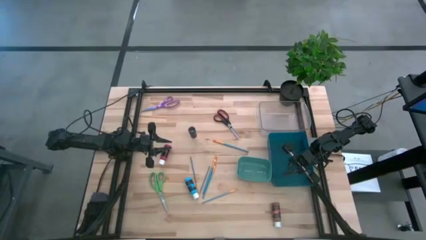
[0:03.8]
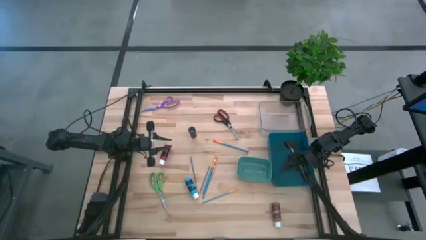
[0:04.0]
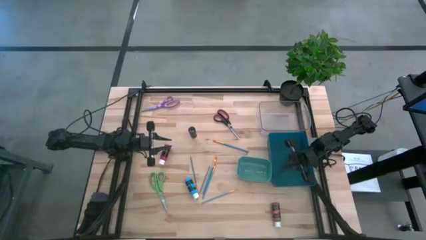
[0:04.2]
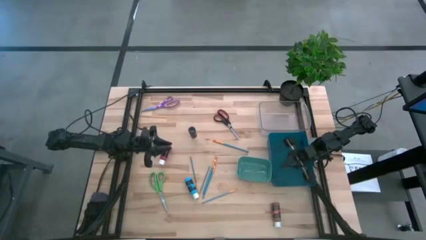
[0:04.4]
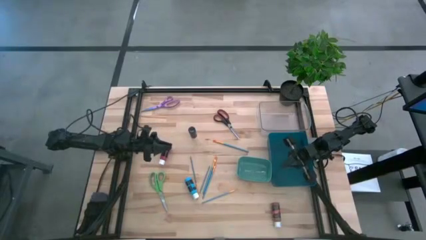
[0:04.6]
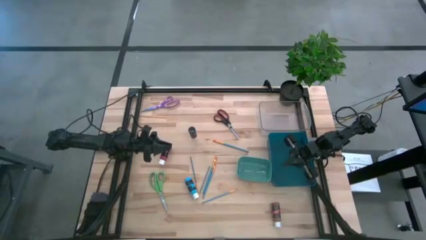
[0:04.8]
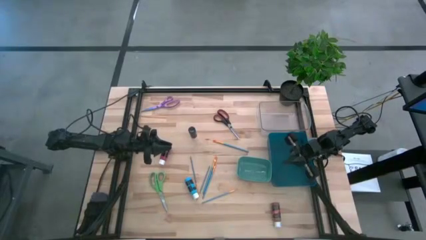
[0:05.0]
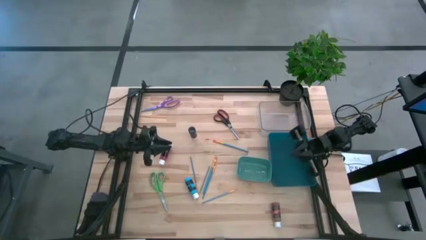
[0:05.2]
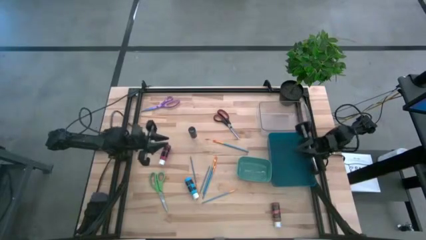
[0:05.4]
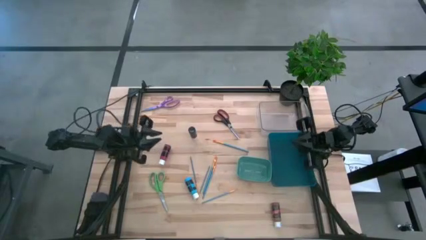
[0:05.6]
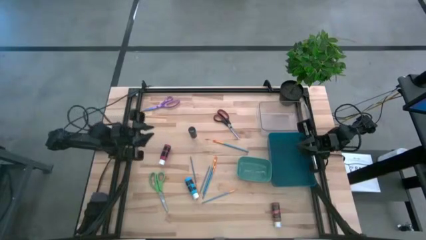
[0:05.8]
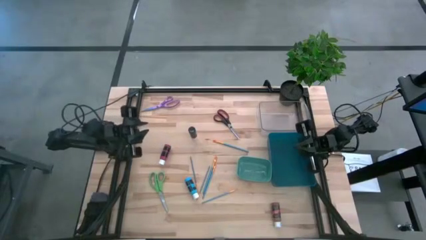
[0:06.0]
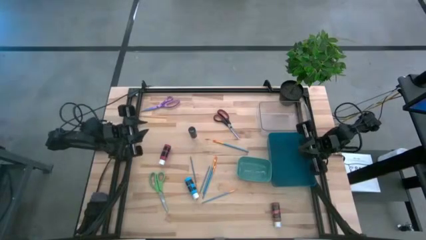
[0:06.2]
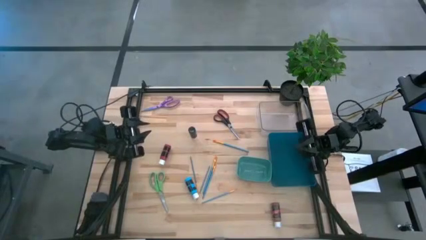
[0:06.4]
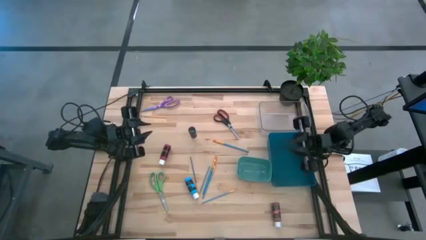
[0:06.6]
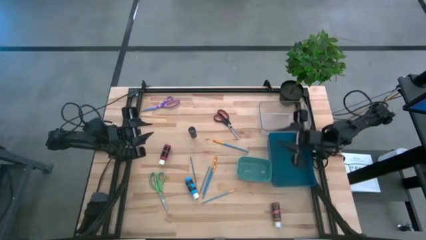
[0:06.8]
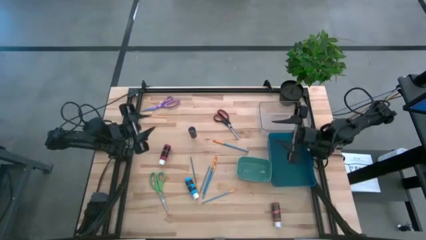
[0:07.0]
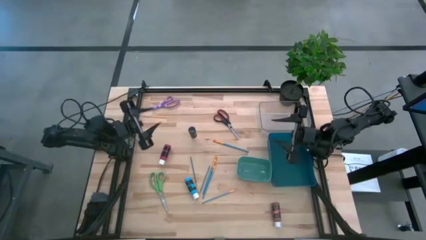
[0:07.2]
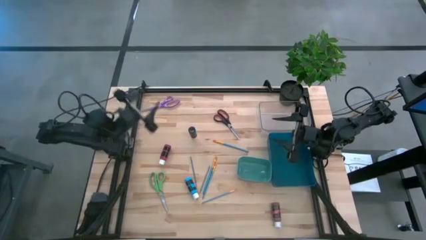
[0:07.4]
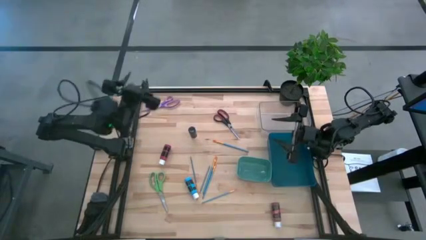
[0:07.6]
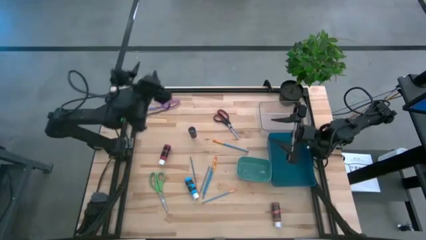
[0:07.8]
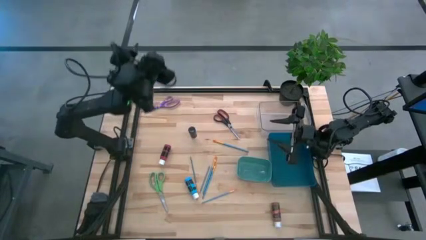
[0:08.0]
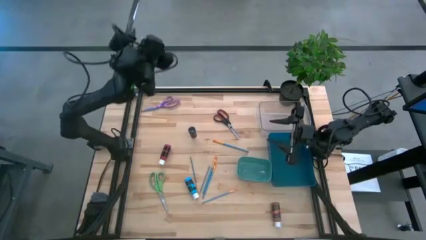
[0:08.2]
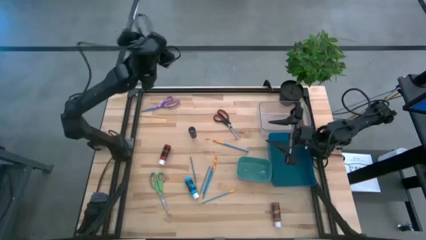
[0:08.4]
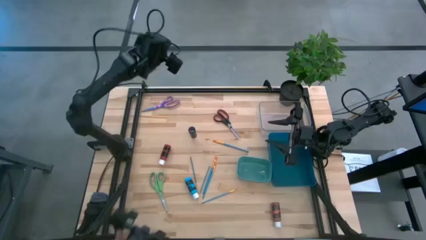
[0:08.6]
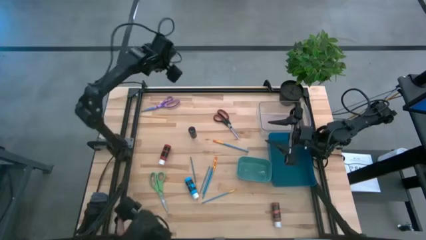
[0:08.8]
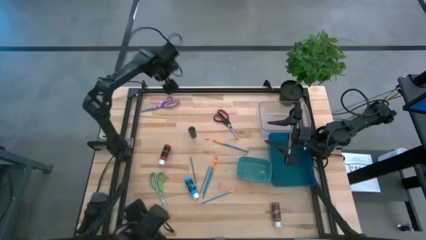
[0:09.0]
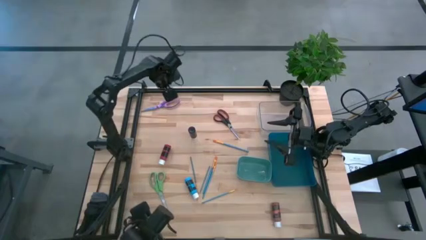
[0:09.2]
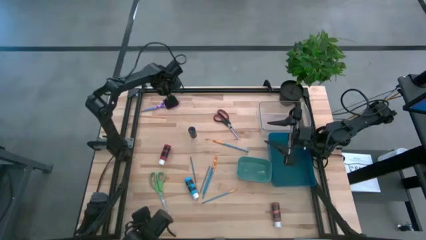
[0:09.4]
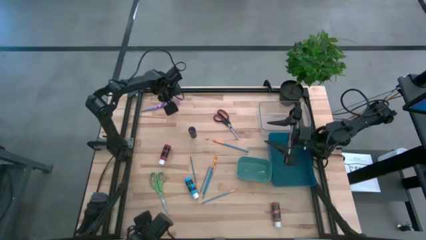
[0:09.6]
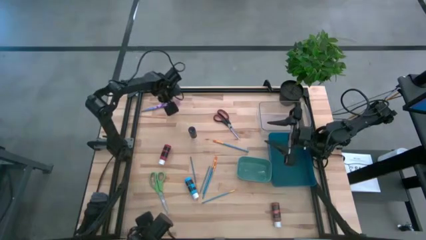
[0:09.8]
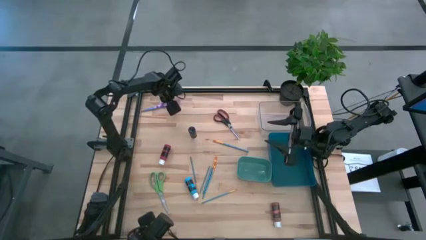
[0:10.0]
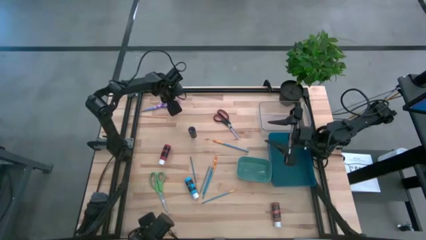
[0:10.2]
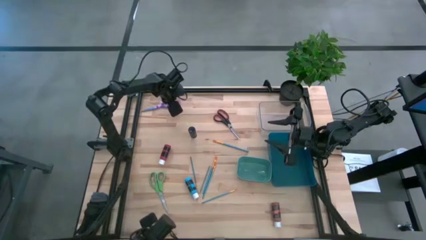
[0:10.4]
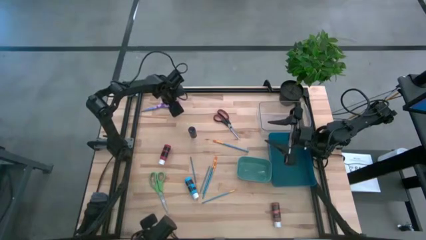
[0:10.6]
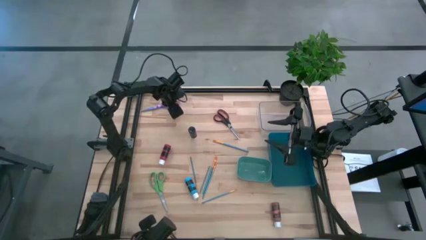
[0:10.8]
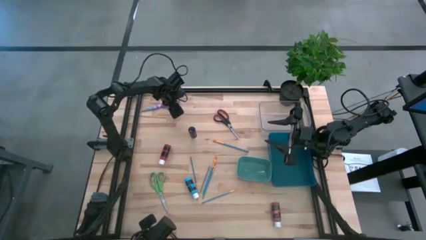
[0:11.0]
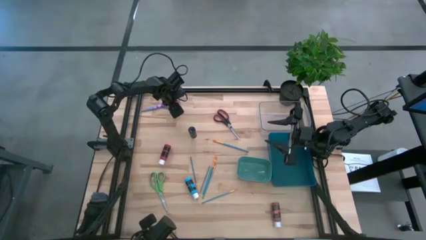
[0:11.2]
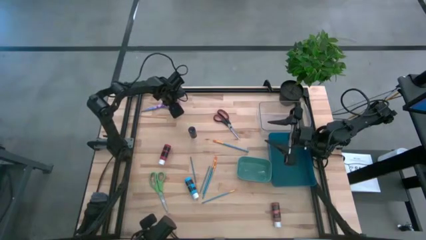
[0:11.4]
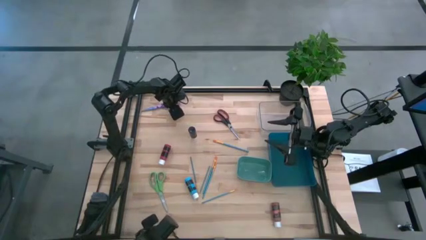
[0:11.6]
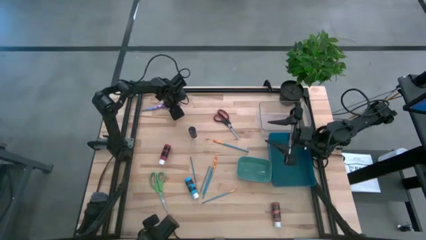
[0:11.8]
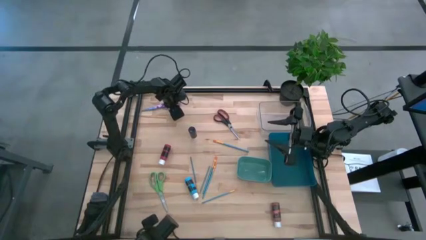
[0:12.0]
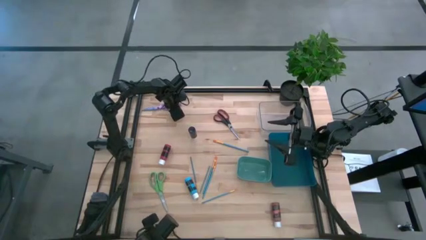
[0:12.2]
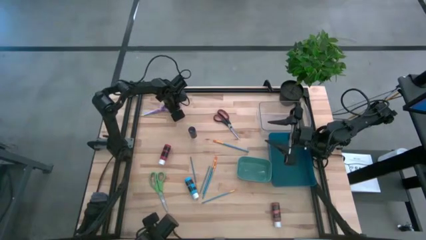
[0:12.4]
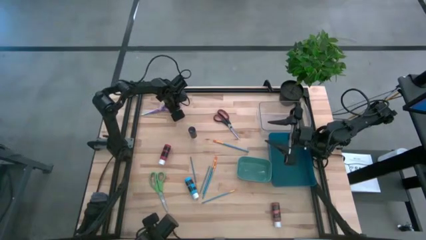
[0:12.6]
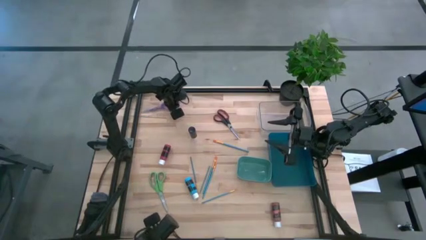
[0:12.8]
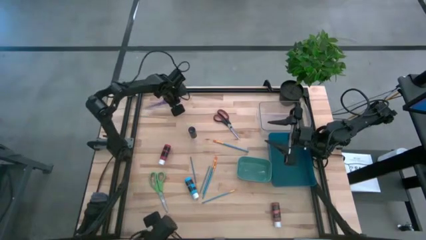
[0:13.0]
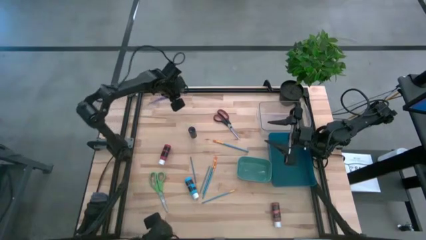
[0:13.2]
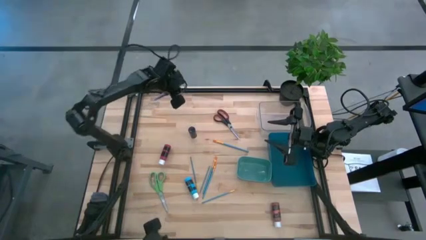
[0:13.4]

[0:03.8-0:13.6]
Task: Pick & Place Paint Supplies
Put the purple scissors into the transparent bin

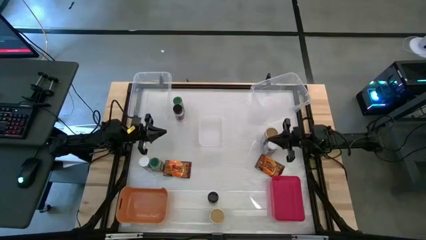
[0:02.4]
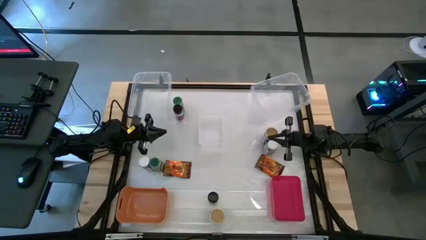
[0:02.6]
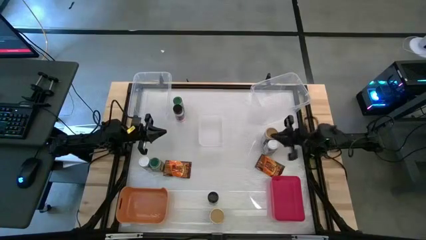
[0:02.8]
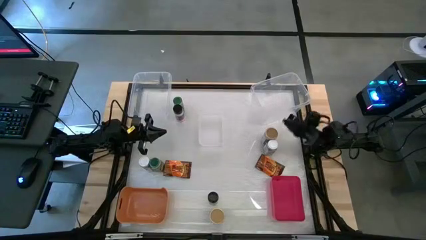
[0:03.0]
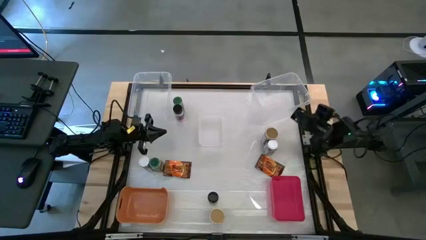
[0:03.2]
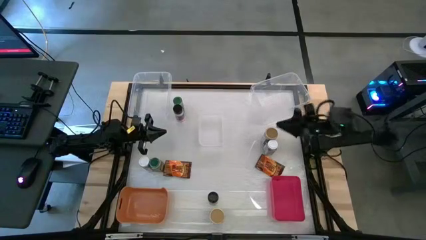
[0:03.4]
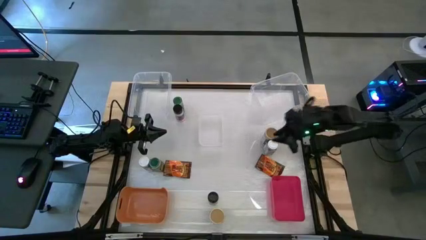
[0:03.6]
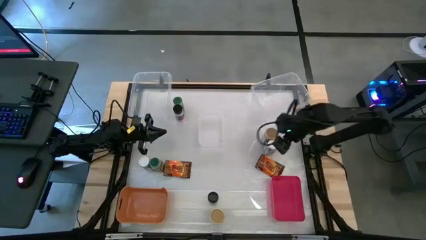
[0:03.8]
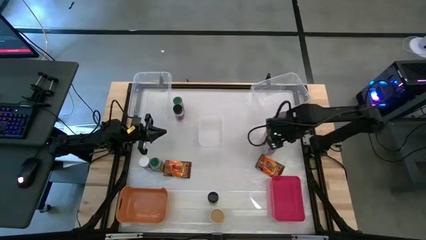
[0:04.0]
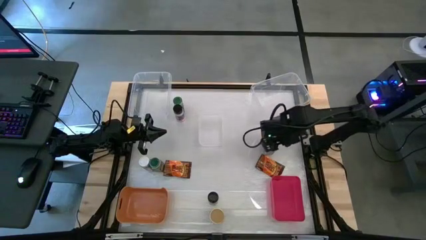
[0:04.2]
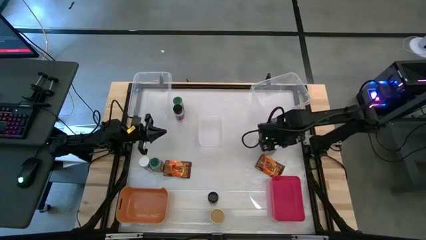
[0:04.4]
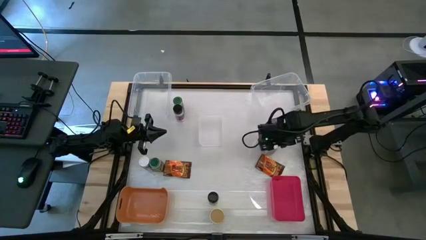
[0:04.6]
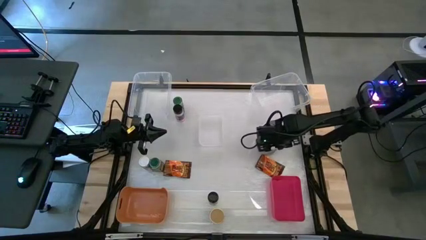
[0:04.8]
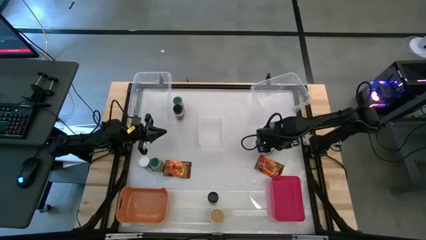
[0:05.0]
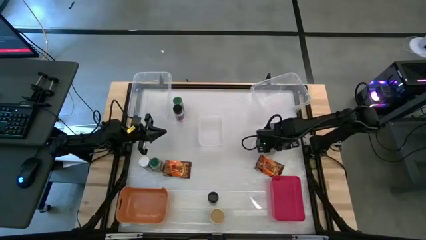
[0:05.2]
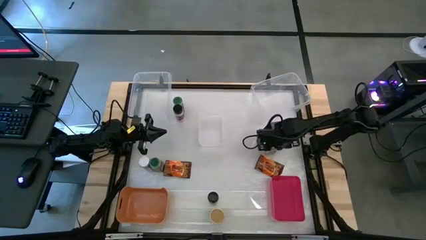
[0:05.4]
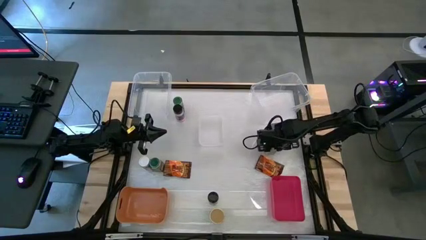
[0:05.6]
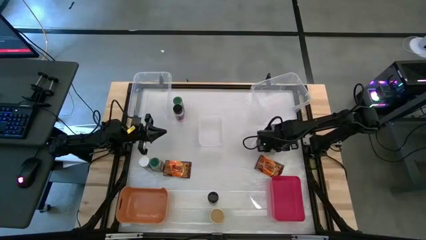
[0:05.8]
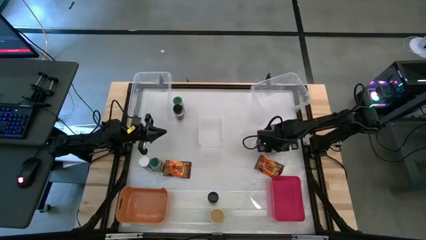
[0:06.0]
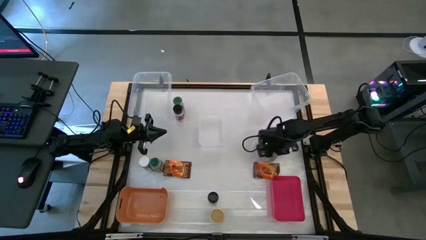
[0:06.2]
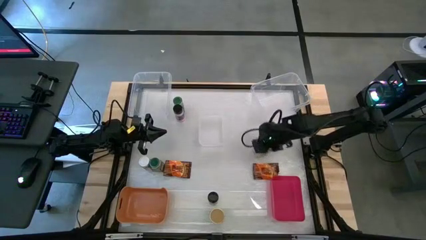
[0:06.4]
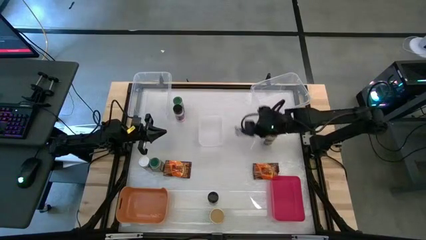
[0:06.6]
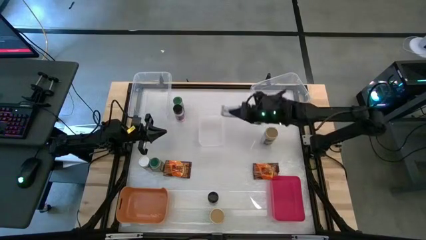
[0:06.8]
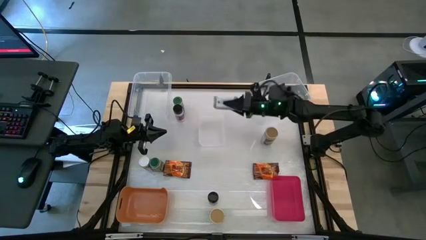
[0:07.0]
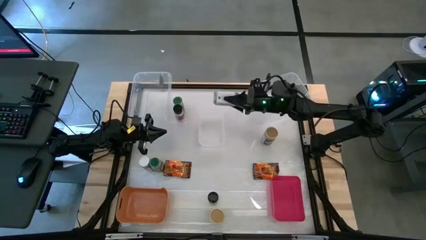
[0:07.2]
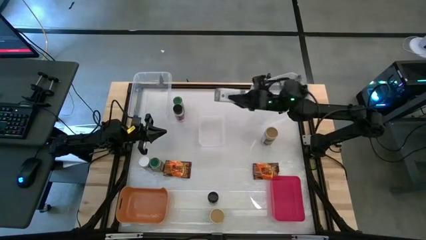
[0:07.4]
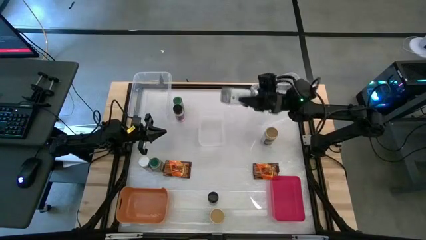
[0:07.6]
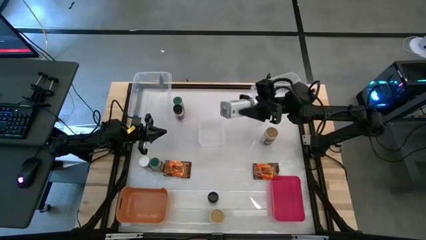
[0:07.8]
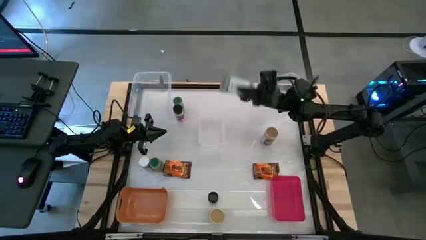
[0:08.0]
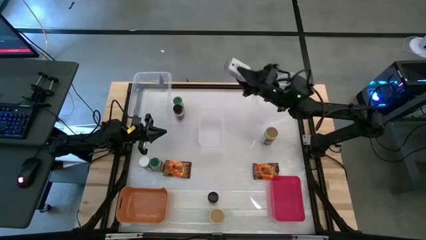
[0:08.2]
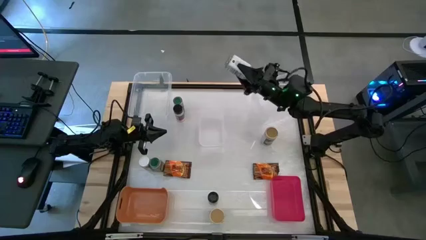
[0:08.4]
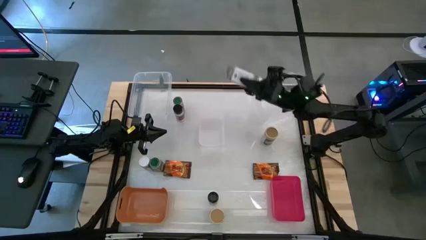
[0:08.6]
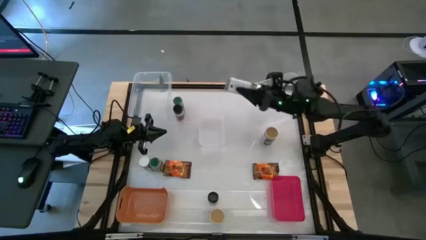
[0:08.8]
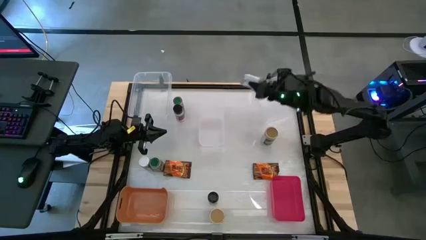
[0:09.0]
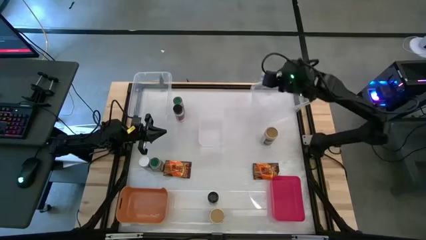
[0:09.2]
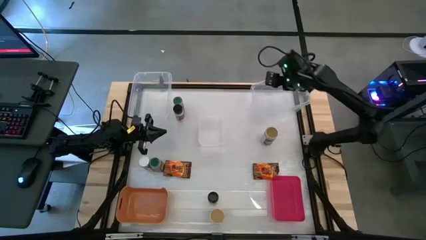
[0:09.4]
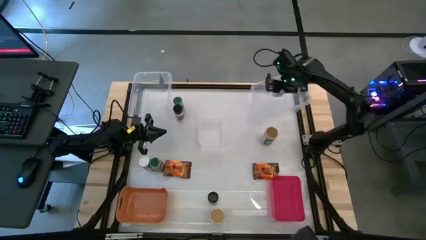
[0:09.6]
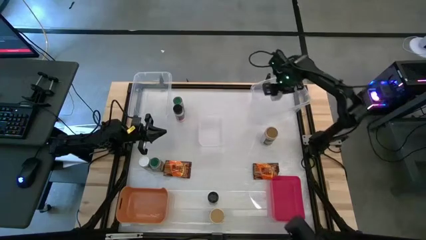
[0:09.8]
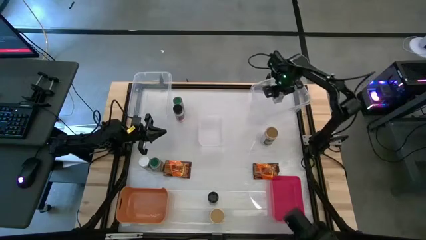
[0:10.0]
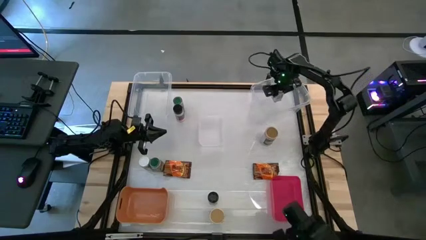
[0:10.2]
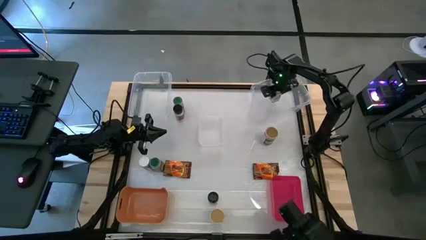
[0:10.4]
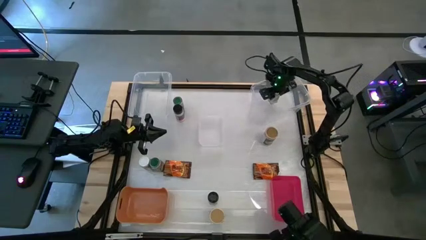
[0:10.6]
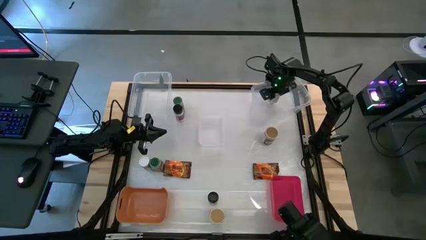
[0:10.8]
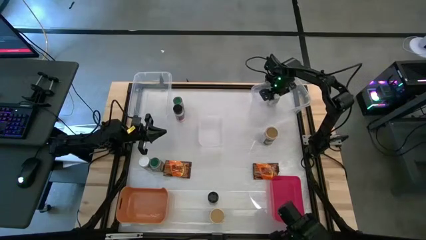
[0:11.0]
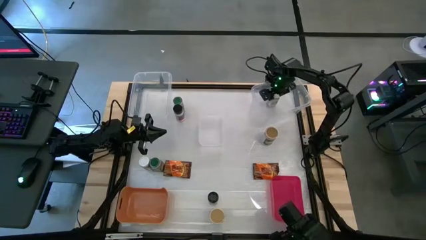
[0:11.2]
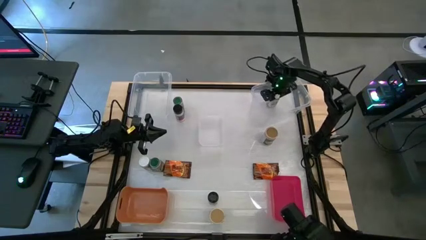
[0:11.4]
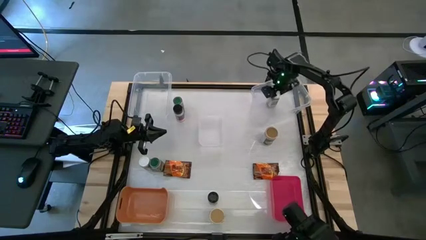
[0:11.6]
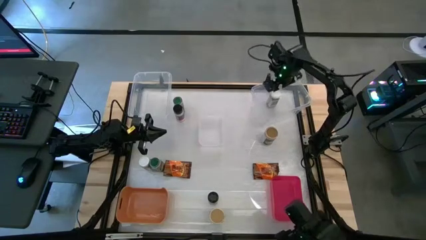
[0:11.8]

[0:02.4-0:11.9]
Task: Sort spices by type
Put the right white seasoning bottle into the right large transparent bin
